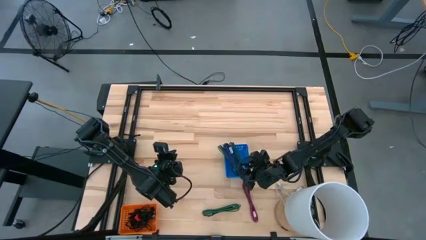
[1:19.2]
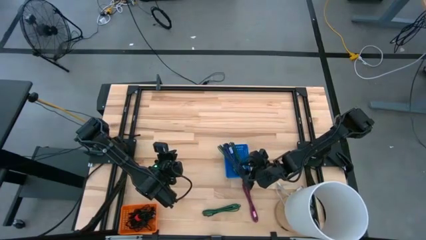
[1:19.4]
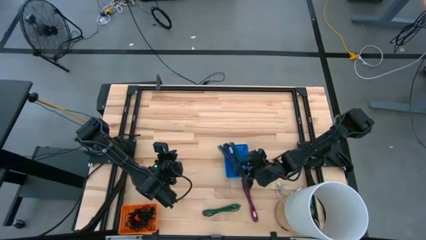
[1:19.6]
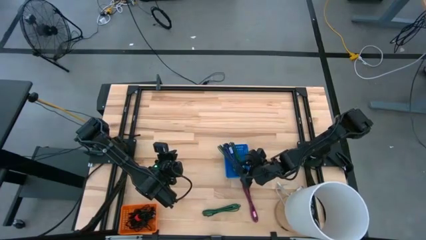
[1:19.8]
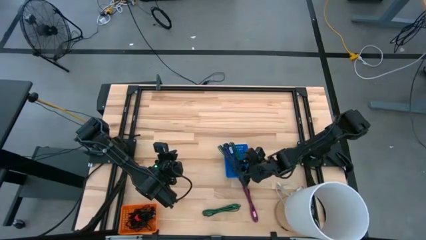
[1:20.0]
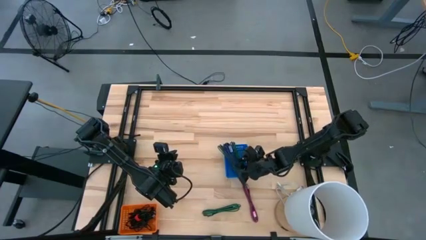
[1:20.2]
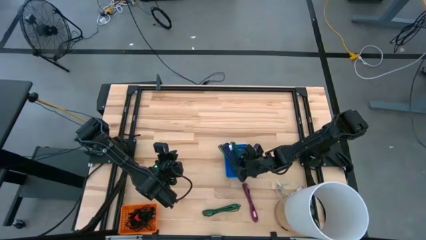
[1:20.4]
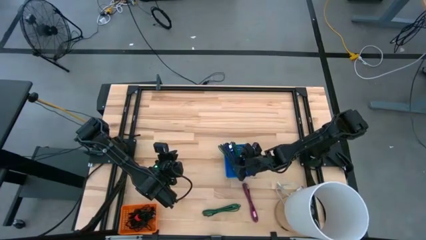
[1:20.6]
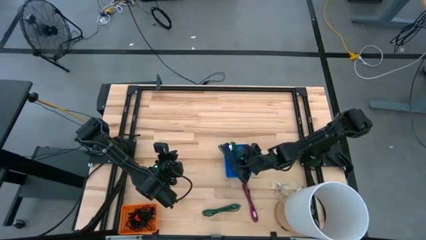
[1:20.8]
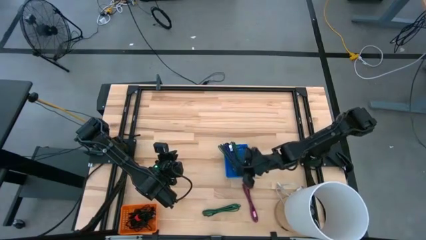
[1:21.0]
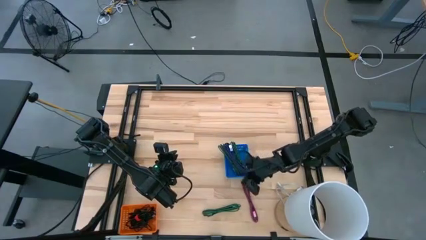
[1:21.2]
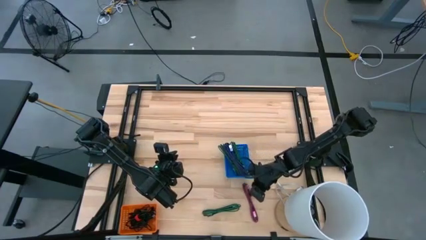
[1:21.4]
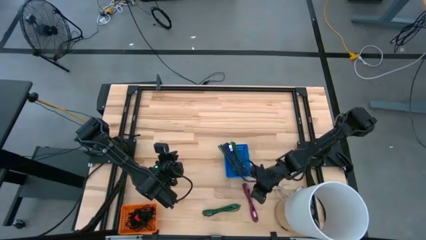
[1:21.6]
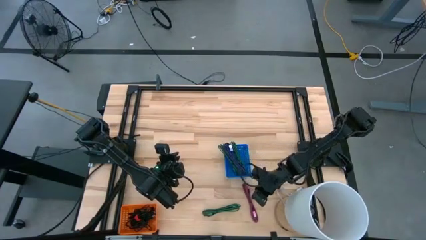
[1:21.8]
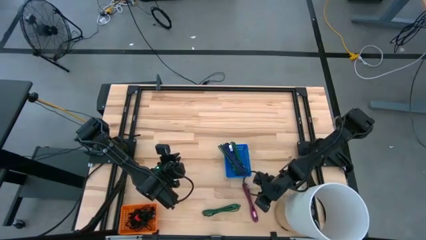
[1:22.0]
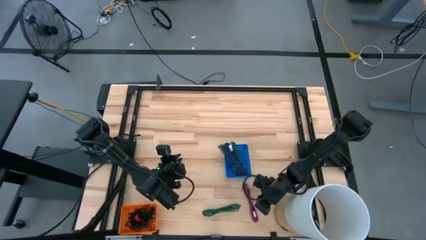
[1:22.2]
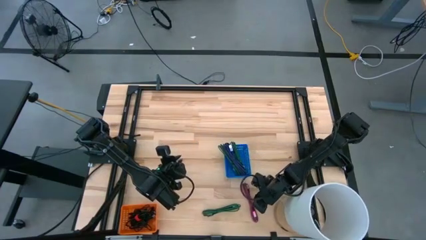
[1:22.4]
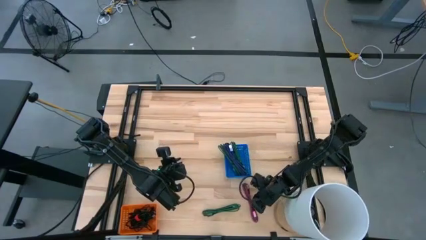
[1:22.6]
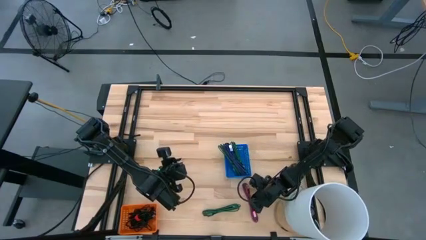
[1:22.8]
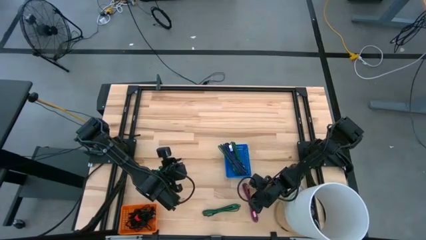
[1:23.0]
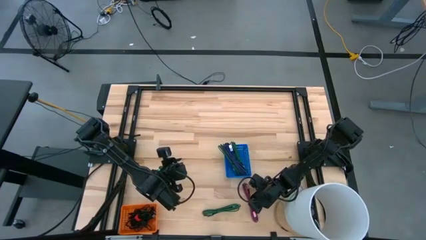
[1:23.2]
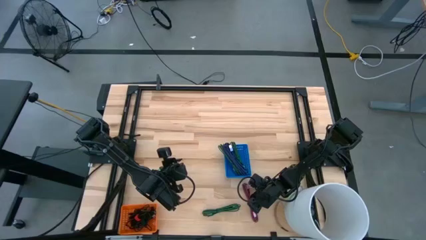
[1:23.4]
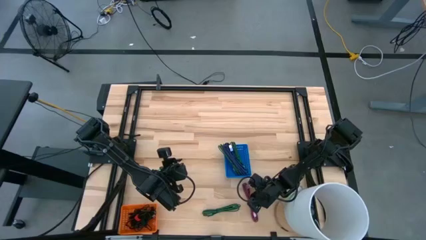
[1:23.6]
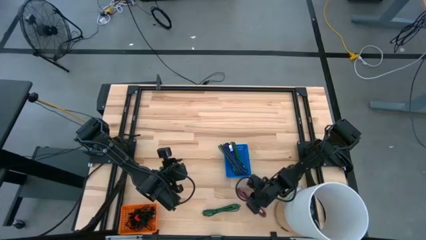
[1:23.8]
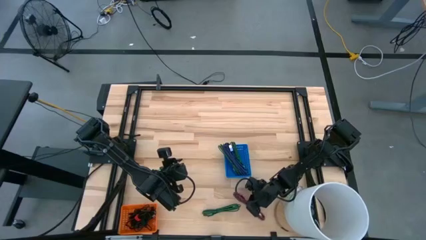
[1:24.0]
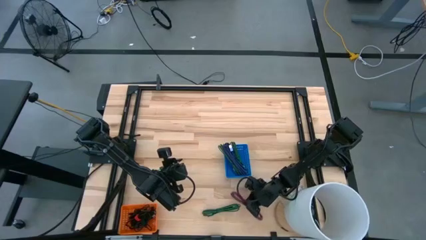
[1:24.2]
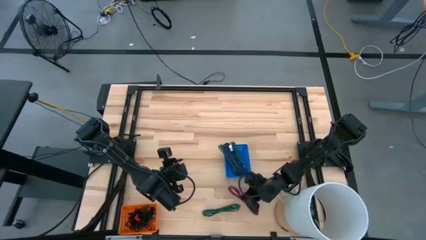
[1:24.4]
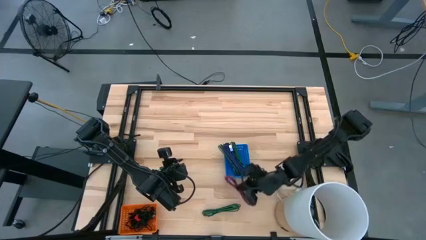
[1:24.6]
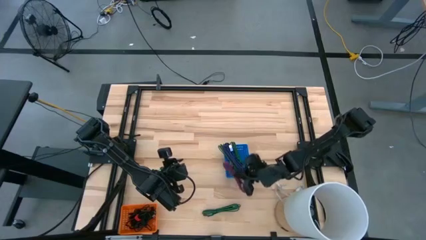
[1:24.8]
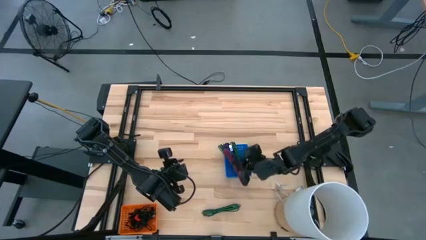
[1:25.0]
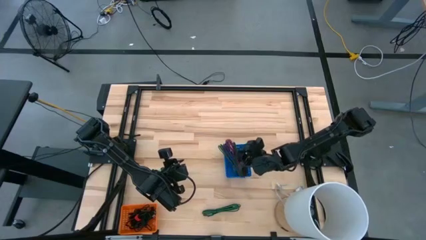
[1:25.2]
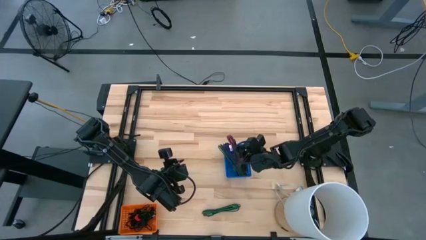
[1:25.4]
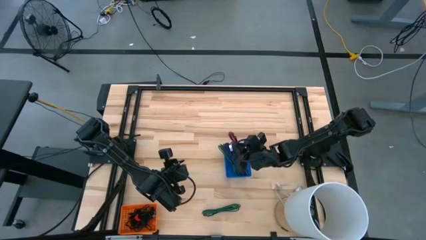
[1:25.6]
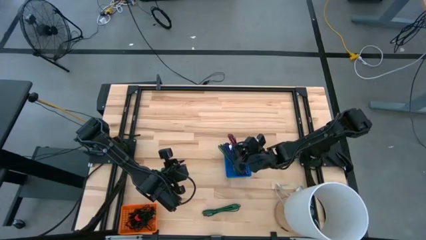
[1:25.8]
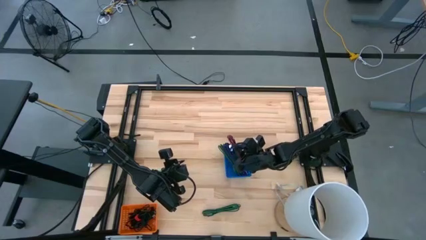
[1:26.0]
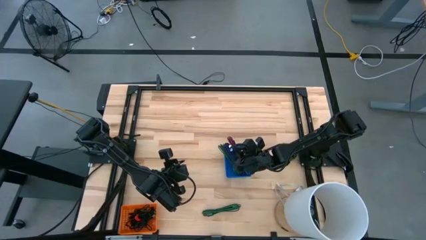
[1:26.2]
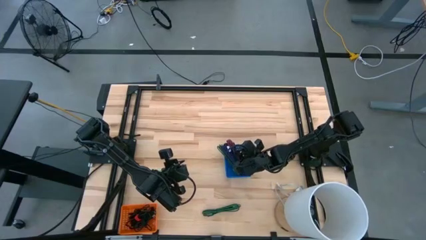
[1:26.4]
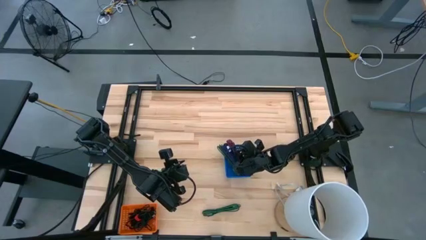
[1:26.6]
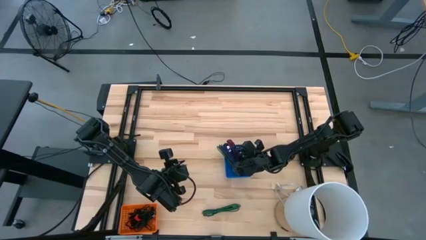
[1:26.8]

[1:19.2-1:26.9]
Task: Pick & Place USB Port
Put the black and pink charger cable into the blue bin

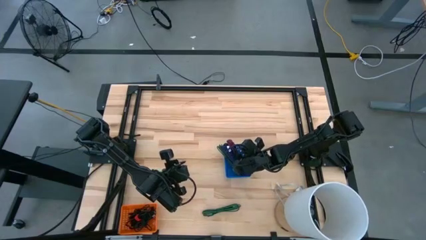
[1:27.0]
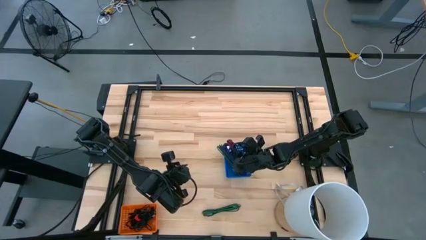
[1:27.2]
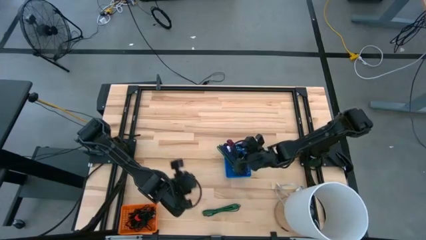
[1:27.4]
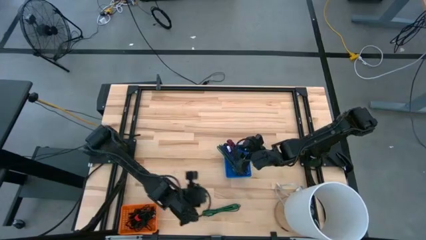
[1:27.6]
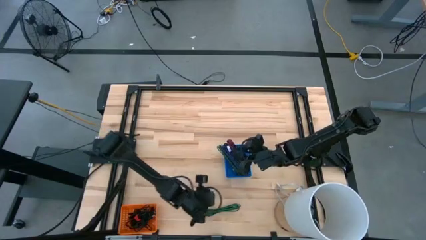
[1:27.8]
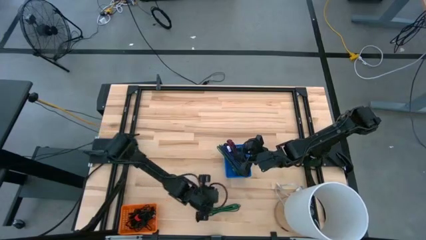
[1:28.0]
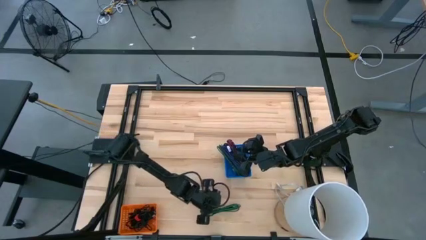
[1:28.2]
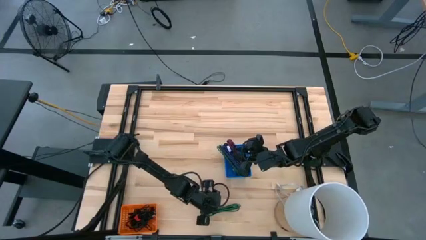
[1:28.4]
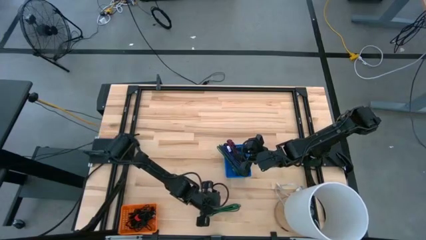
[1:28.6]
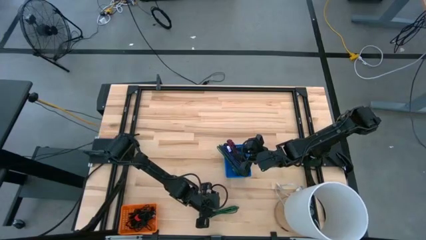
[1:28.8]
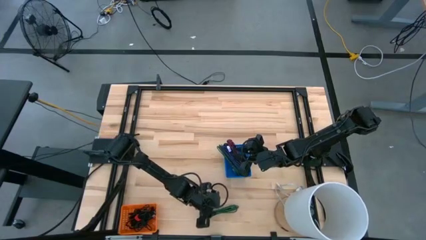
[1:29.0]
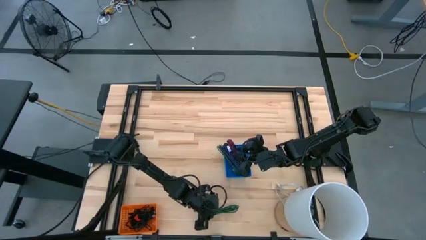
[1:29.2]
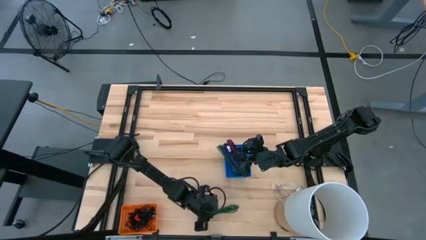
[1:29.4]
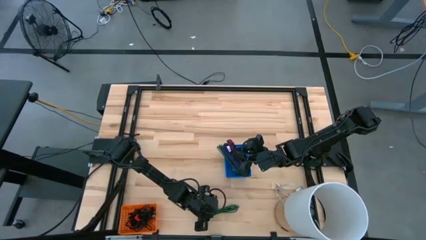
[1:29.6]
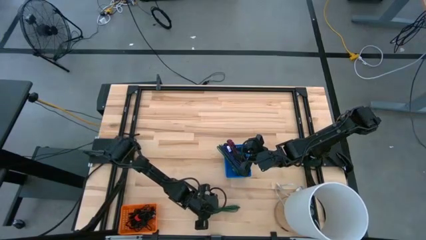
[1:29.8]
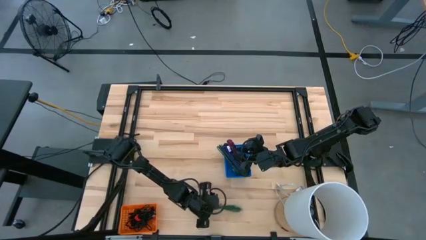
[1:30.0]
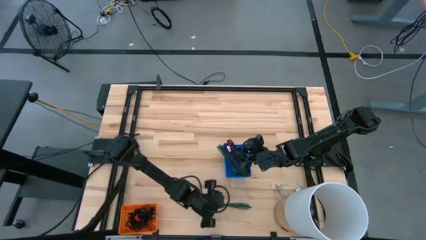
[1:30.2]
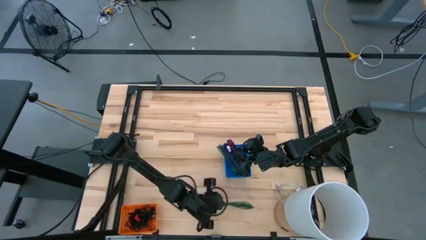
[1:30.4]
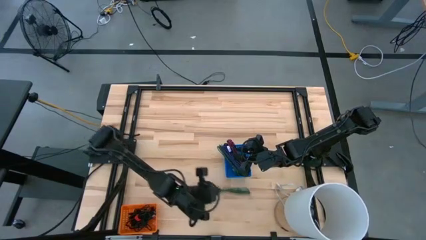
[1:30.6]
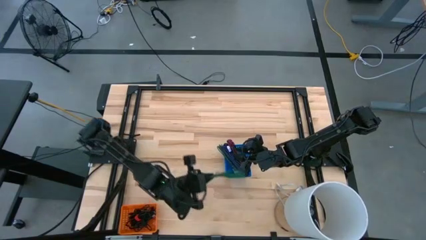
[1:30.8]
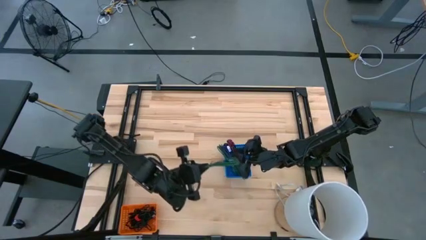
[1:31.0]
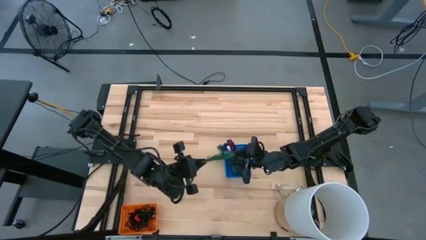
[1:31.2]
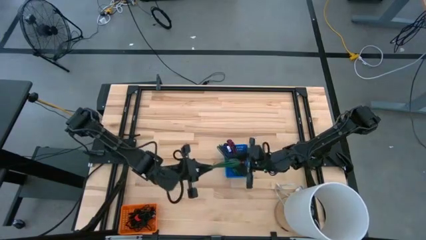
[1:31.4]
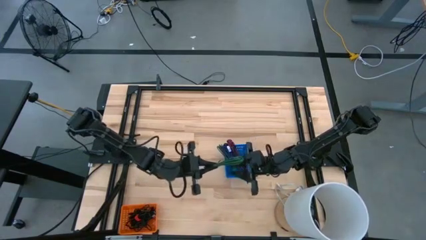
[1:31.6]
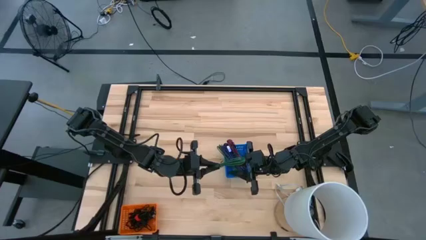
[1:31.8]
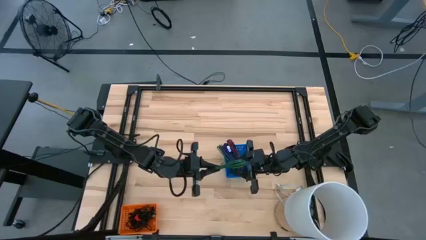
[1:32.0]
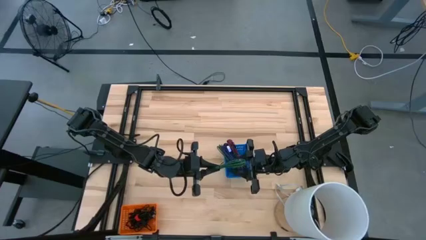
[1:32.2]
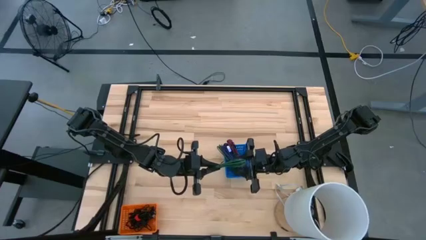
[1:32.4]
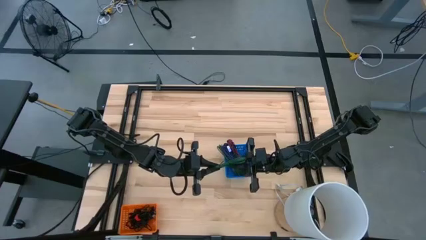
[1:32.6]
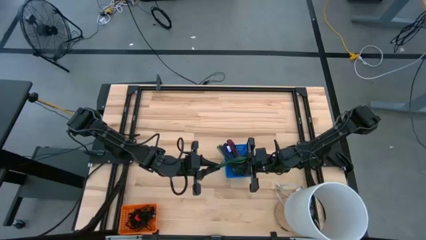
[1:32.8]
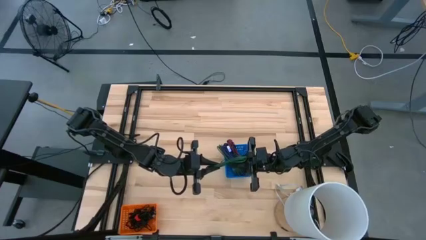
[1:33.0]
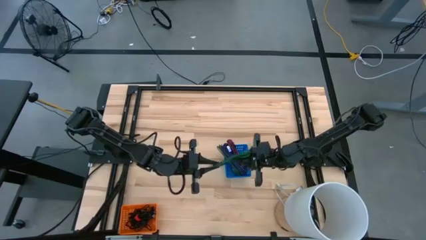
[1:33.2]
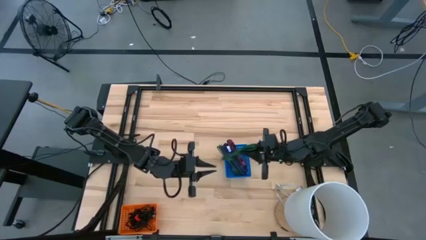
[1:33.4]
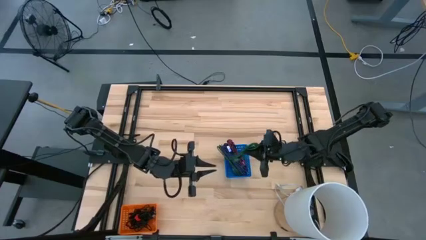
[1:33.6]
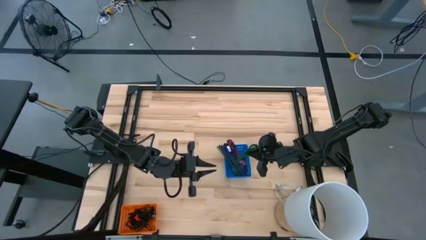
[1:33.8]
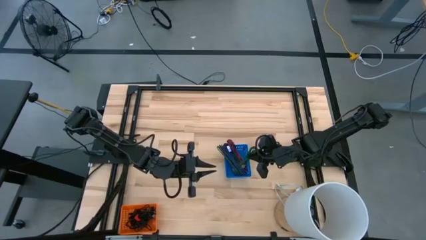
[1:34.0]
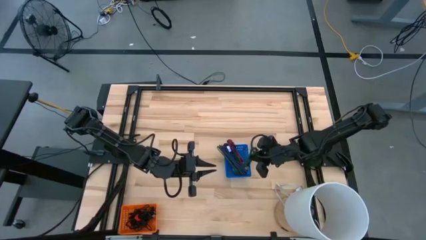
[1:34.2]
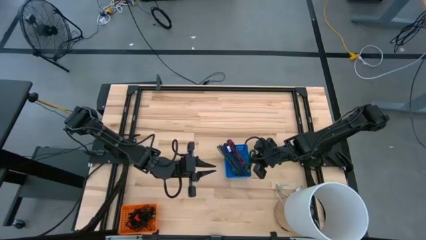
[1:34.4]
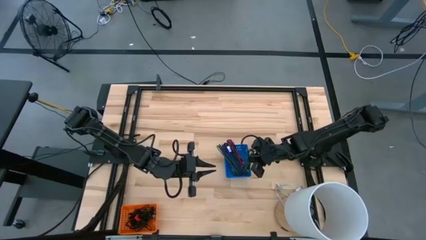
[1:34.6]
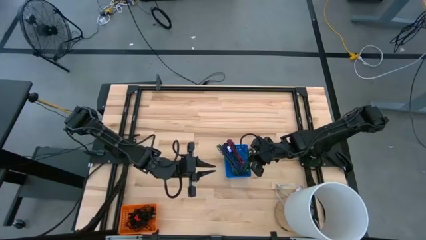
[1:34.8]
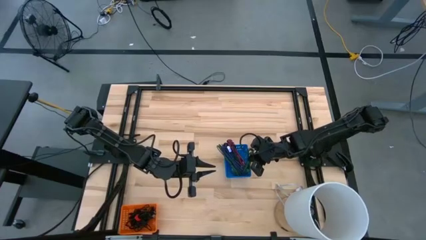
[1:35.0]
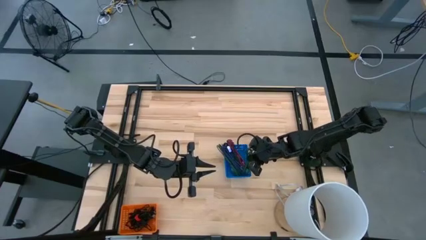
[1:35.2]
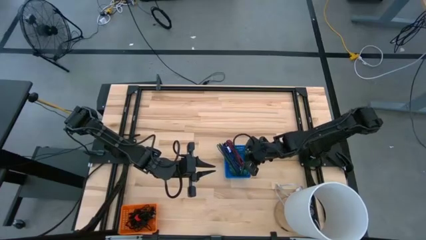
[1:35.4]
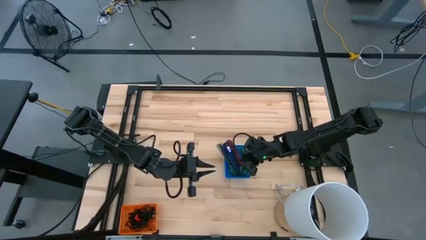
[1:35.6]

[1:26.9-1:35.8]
Put the green and black charger cable into the blue bin
